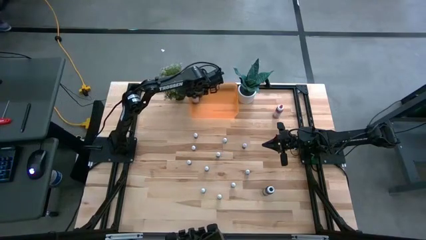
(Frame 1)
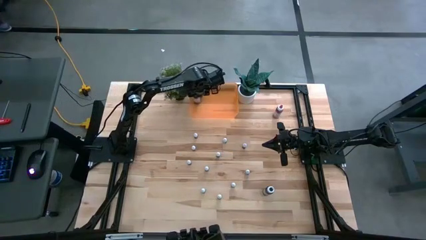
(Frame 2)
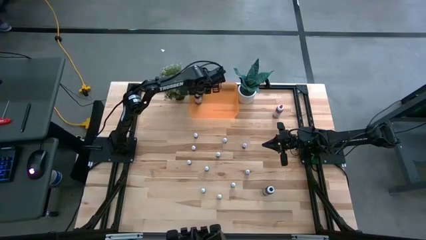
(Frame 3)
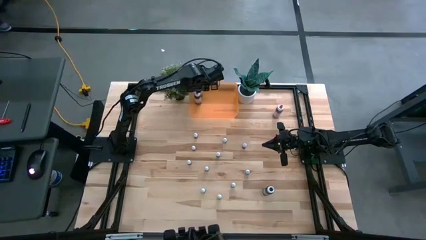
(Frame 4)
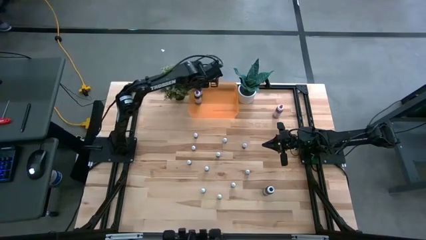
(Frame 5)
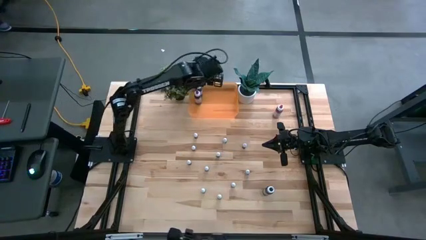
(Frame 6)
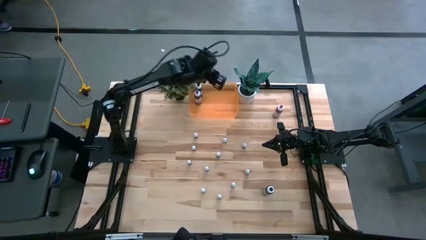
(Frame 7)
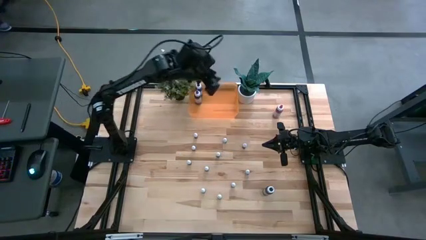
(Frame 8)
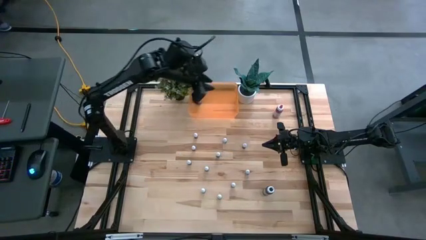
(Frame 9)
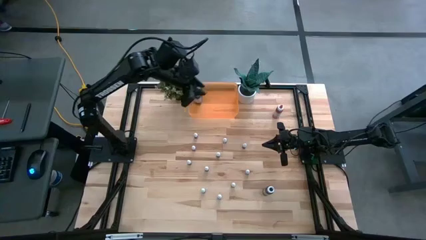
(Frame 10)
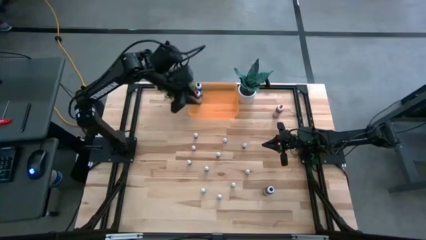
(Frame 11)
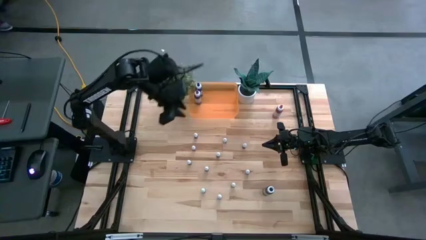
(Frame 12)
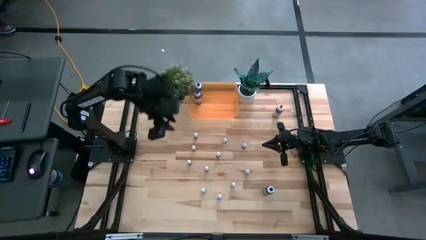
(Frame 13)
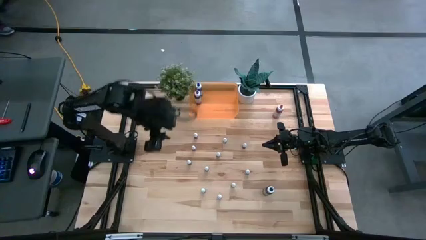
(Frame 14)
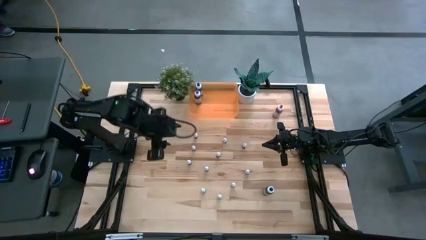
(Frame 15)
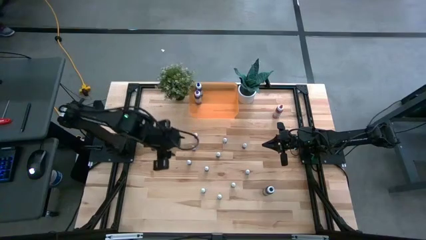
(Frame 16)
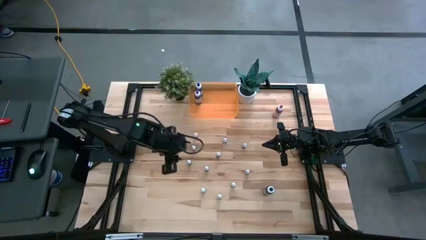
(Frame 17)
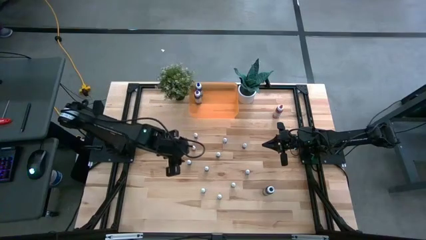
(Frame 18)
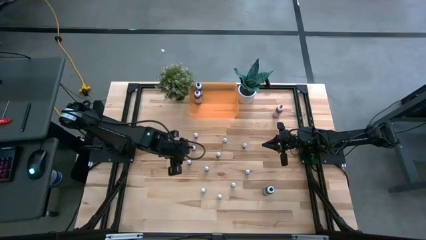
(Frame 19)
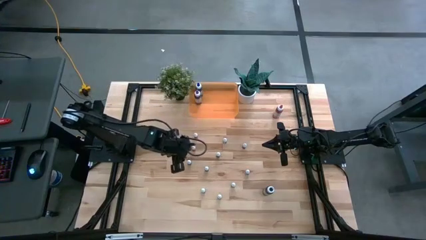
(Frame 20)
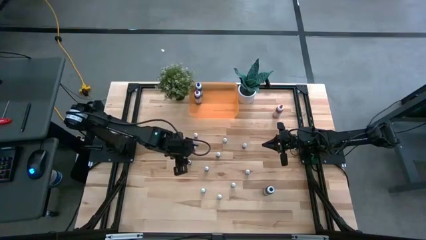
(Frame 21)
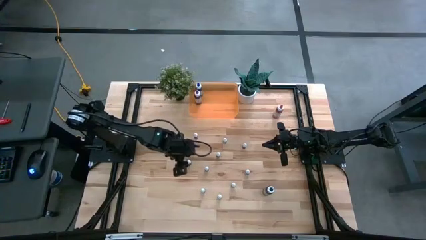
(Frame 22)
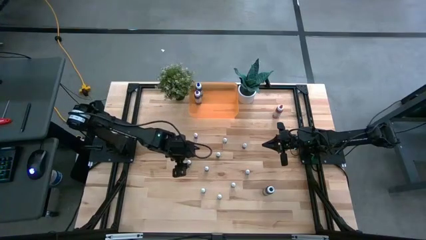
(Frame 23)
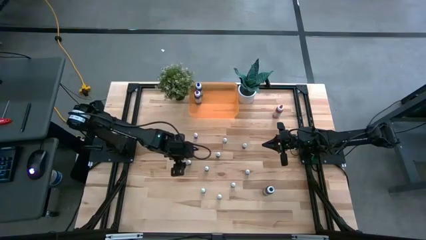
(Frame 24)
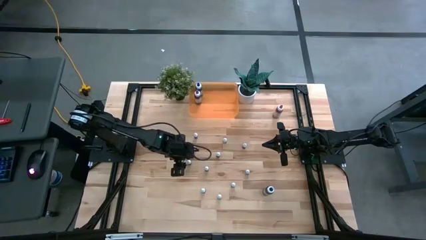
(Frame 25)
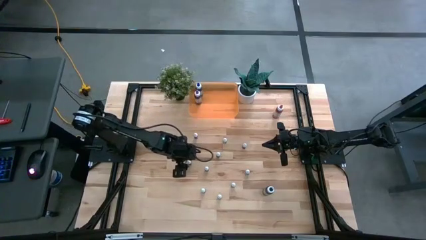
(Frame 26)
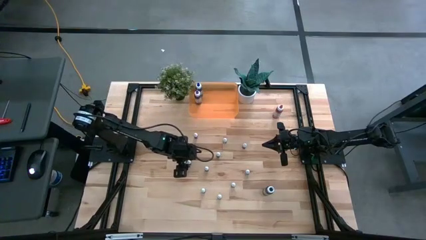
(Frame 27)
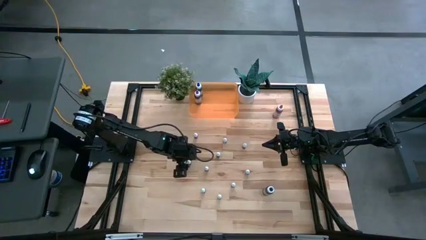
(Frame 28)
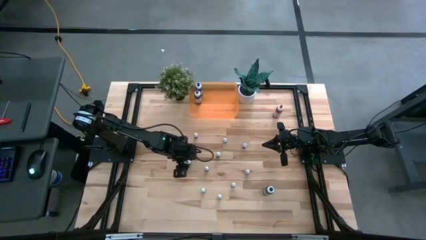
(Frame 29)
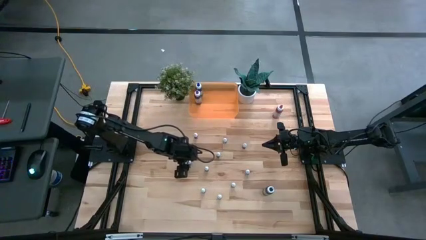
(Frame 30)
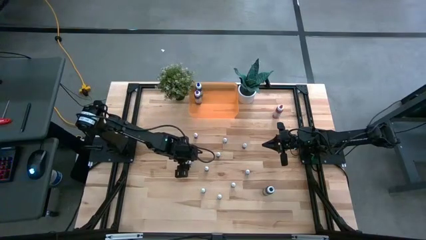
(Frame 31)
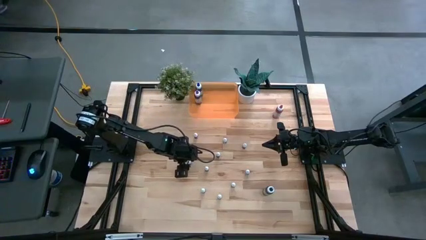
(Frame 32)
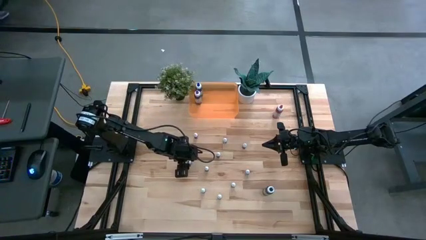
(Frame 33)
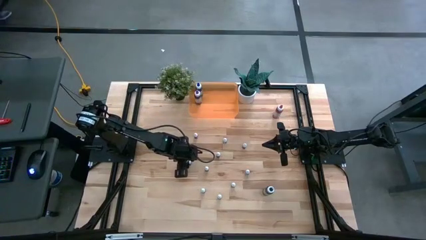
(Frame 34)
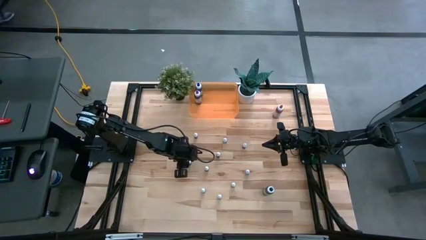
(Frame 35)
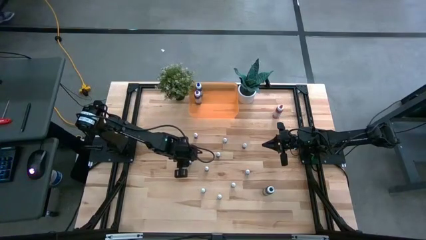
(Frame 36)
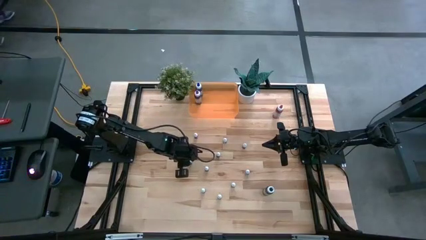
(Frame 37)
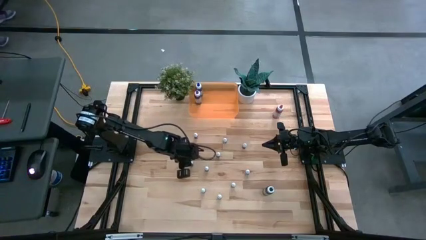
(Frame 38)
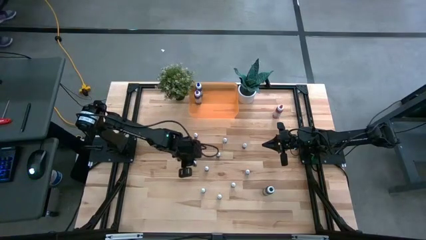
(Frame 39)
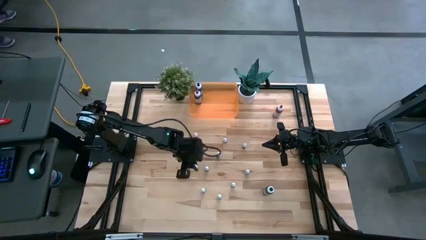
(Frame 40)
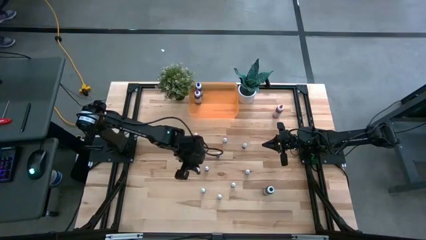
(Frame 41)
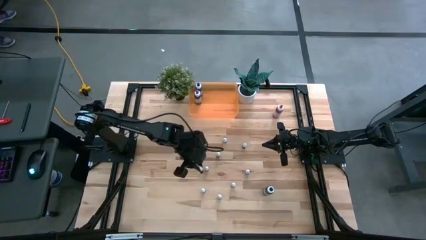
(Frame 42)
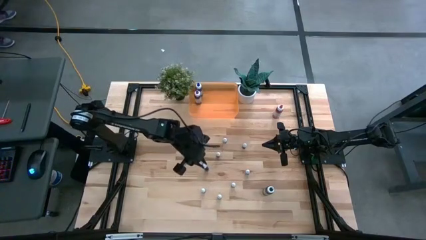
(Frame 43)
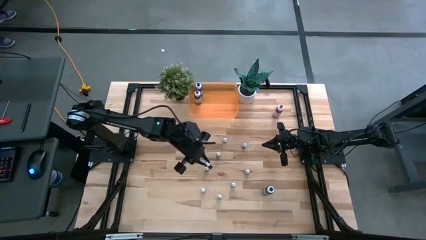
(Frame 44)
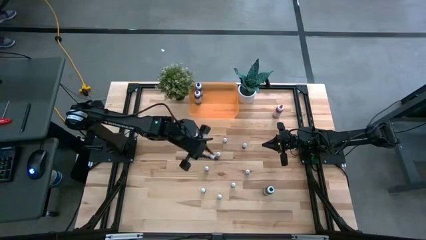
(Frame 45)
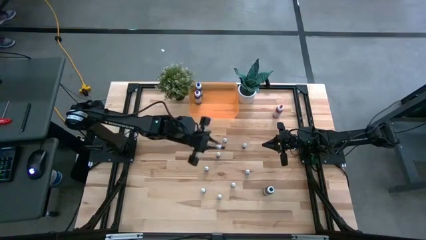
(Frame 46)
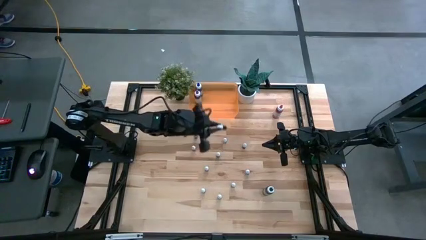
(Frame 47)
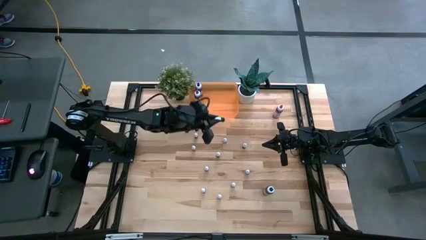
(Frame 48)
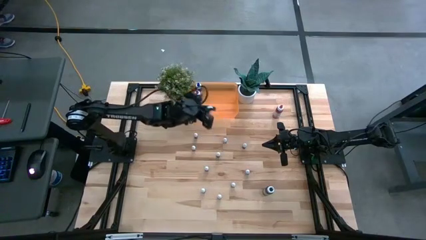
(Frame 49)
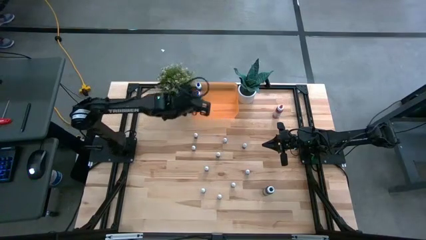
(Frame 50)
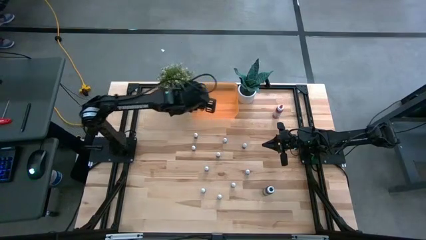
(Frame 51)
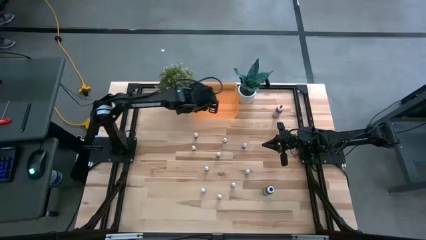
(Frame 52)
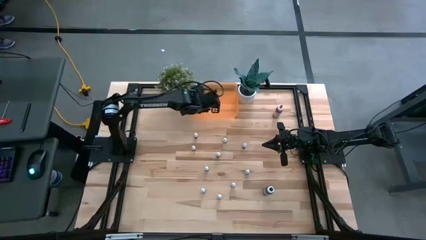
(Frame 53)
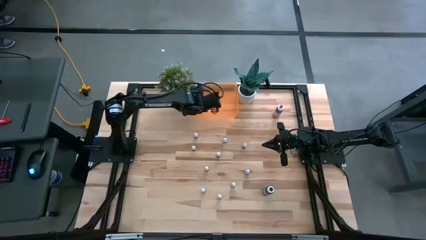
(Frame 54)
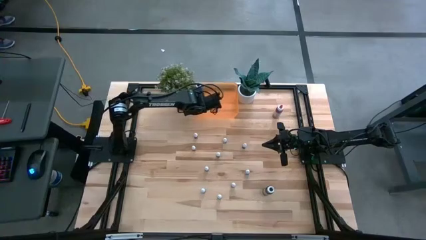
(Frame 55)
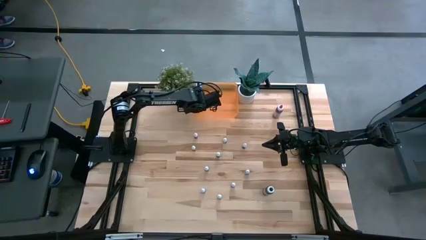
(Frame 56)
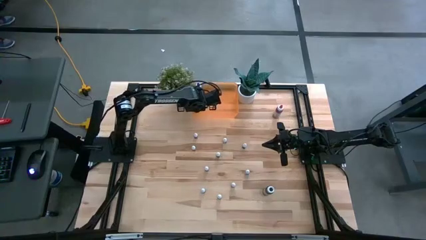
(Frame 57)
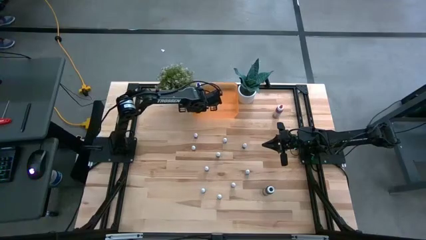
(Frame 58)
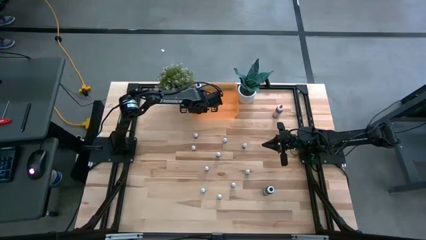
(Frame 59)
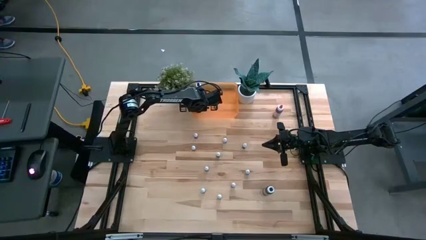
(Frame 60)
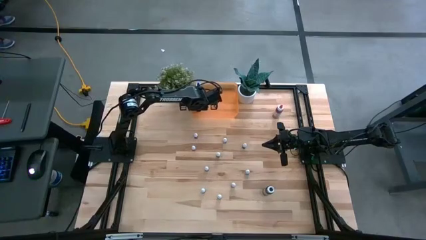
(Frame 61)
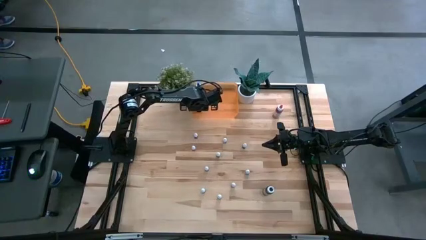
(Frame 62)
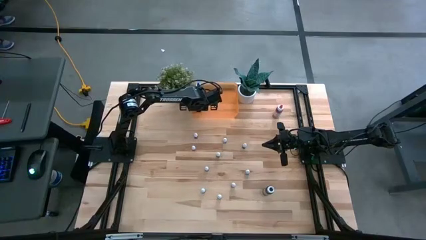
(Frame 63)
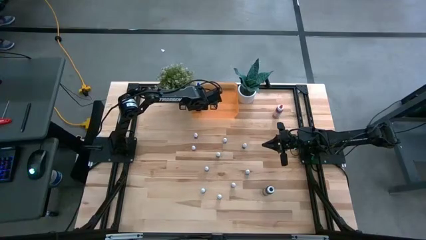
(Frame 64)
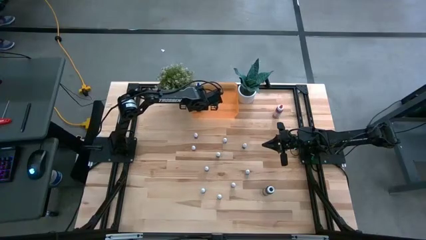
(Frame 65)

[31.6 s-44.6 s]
Task: Pick & Place food coloring
Put the small light green bottle into the bin
